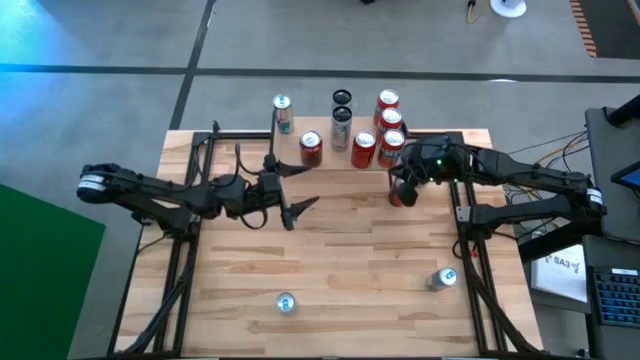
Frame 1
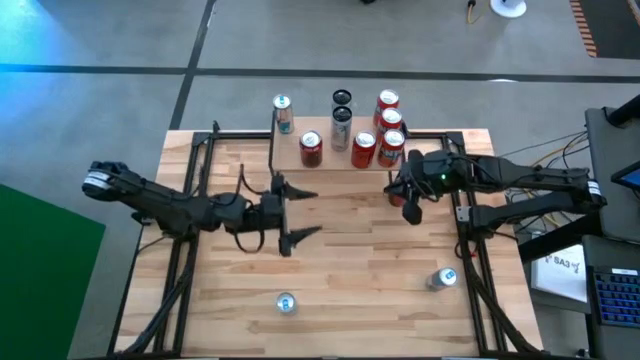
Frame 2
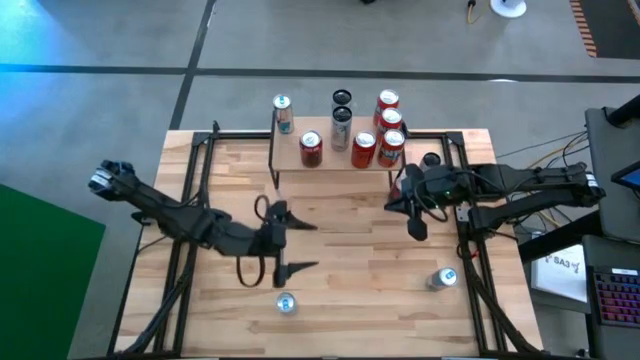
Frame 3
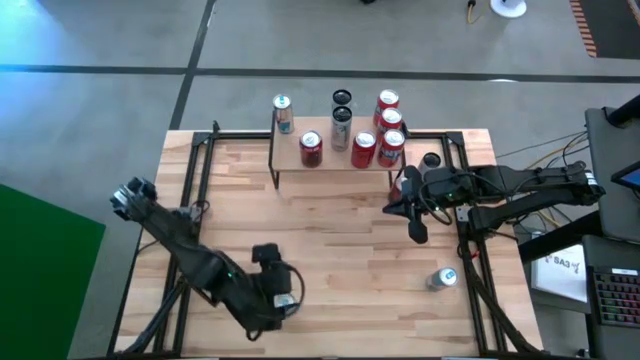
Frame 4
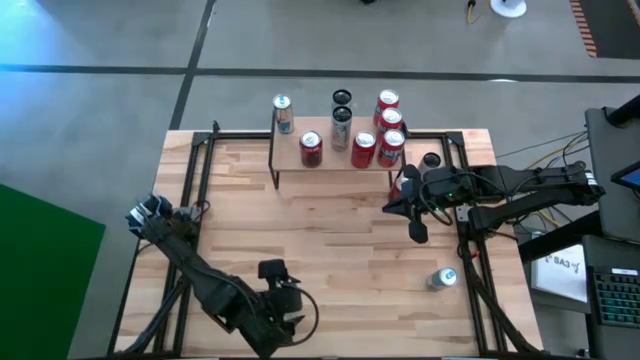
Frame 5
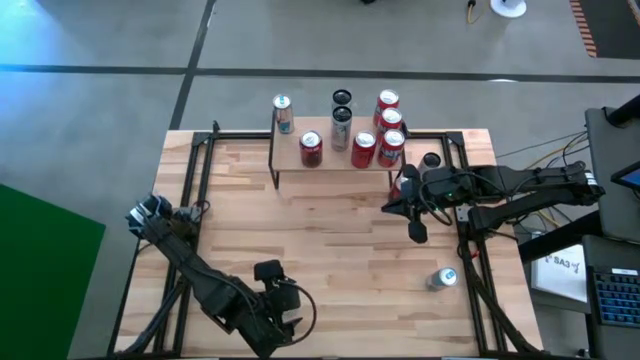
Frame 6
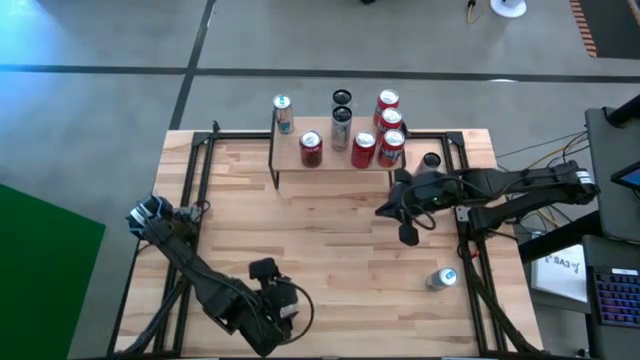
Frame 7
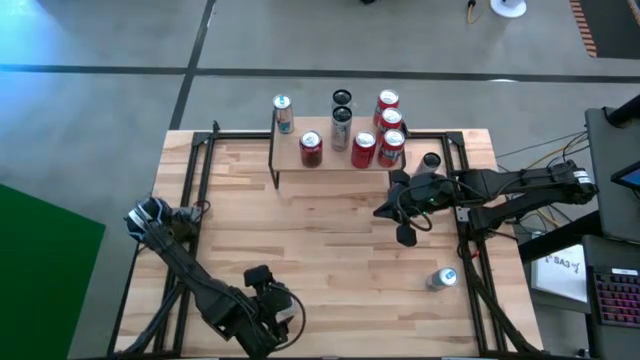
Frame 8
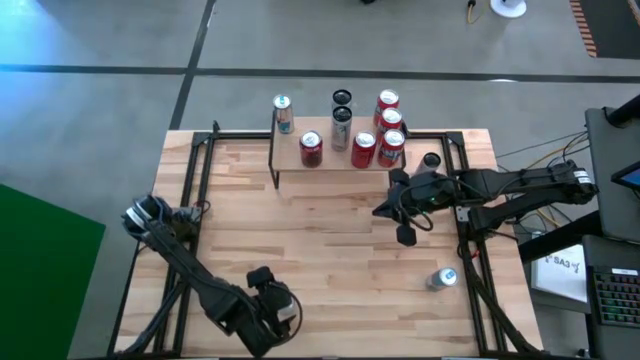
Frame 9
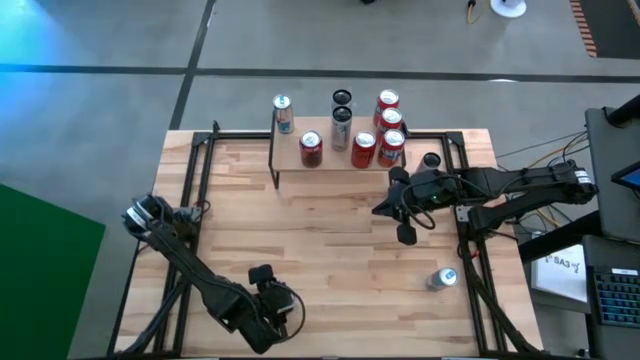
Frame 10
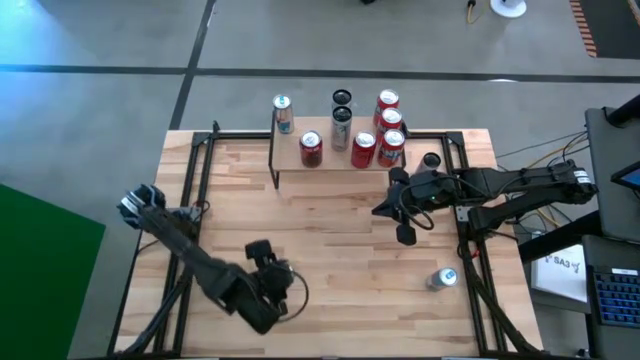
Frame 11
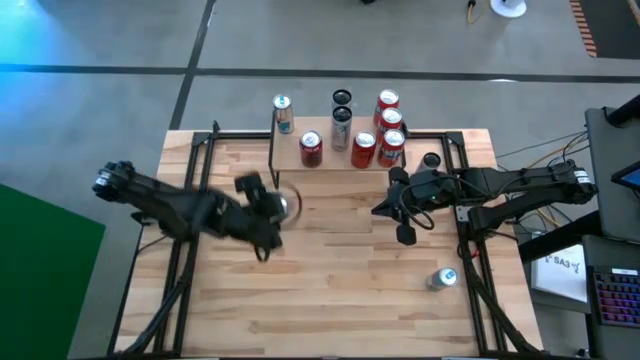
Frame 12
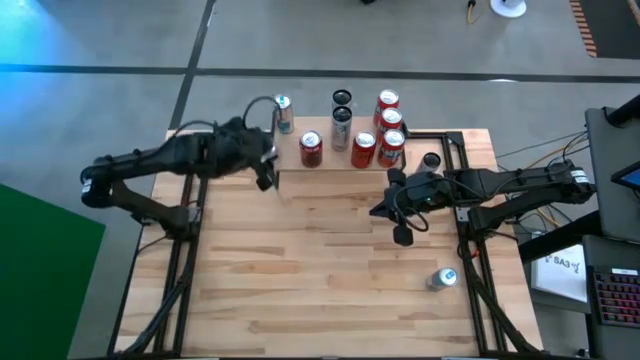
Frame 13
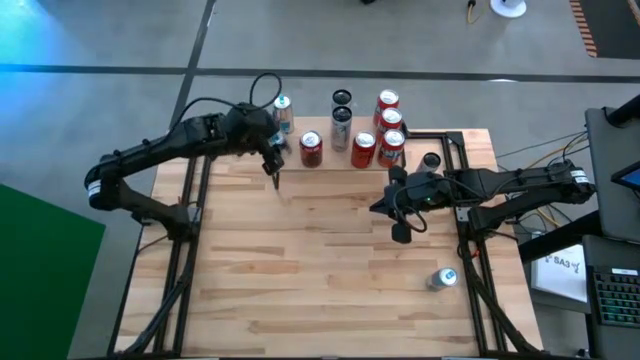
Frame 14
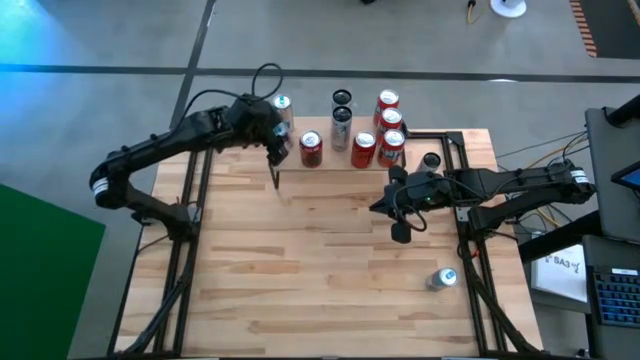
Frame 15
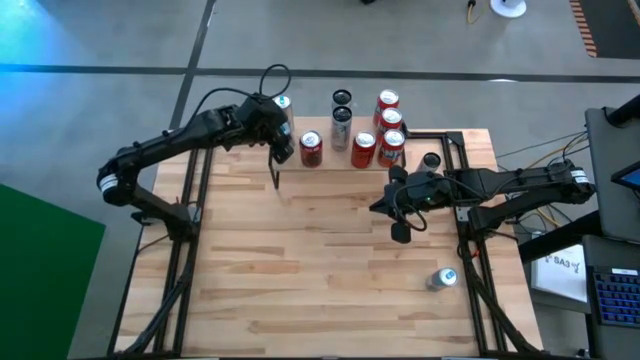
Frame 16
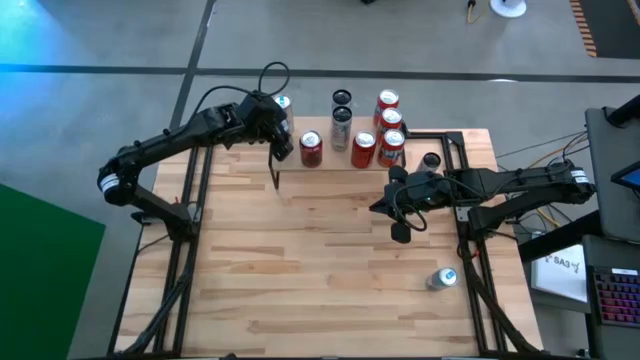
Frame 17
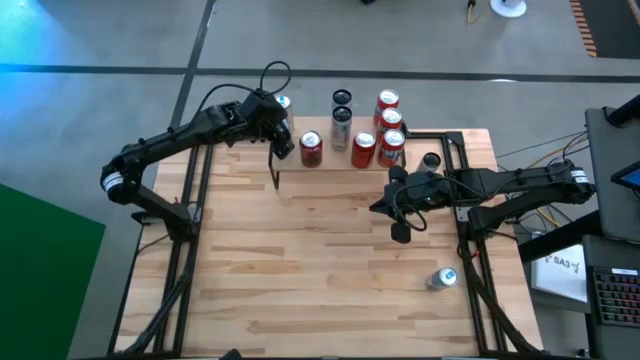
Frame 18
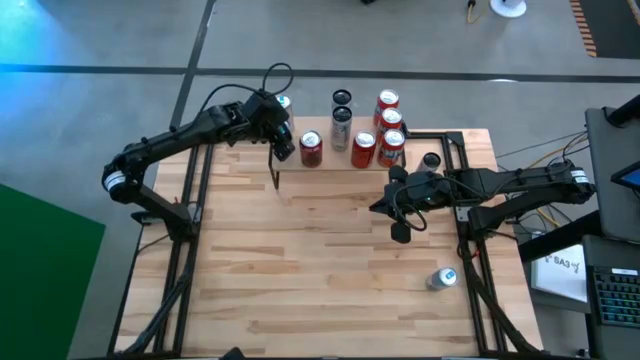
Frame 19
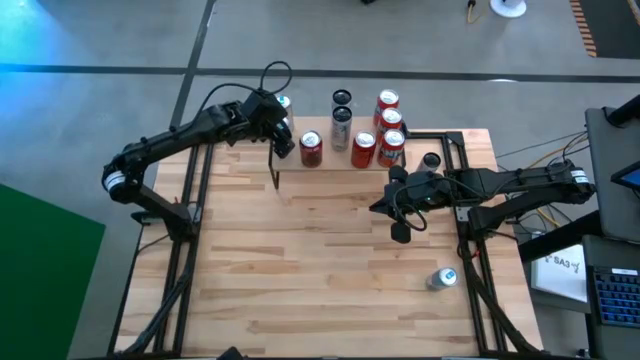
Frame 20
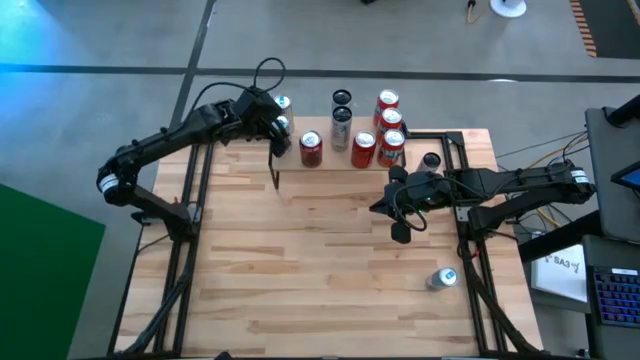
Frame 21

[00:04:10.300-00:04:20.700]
Task: Place canned beverage on shelf
Put the bottom blue soda can on the shelf

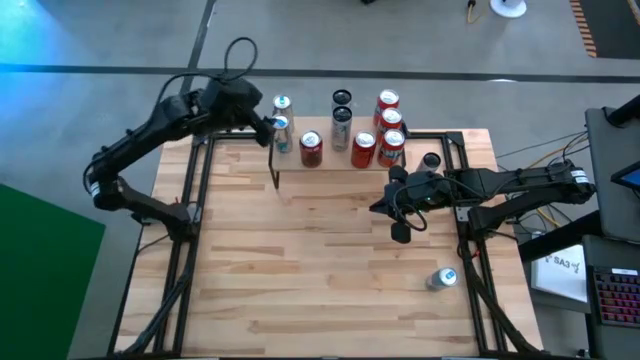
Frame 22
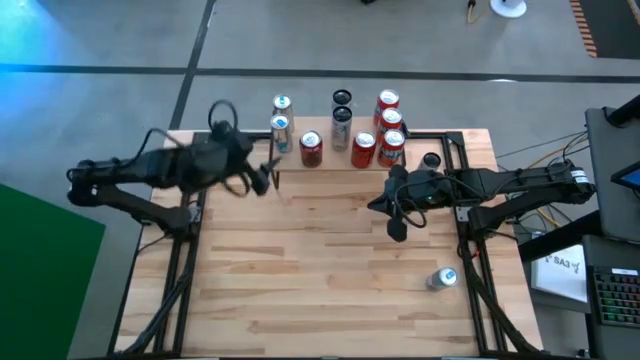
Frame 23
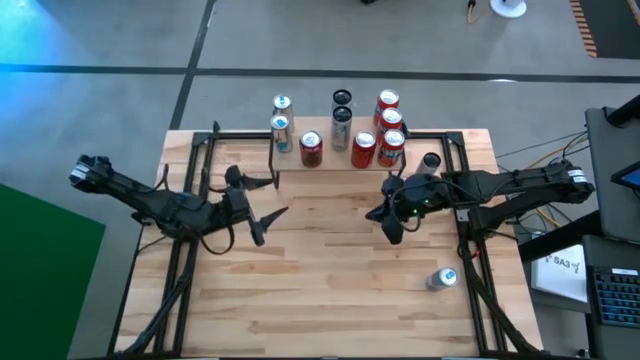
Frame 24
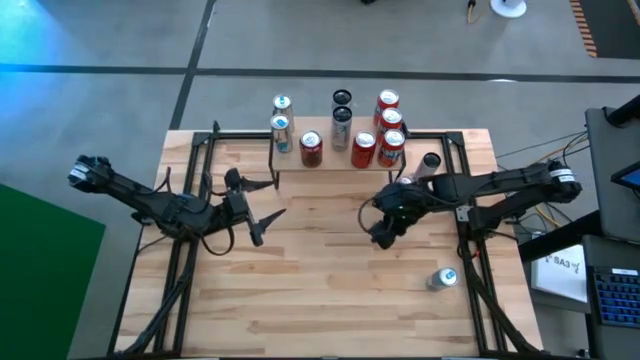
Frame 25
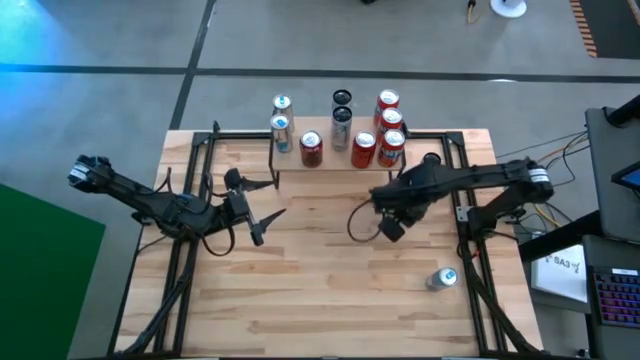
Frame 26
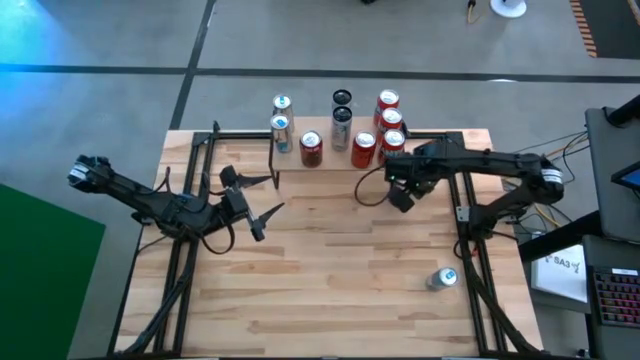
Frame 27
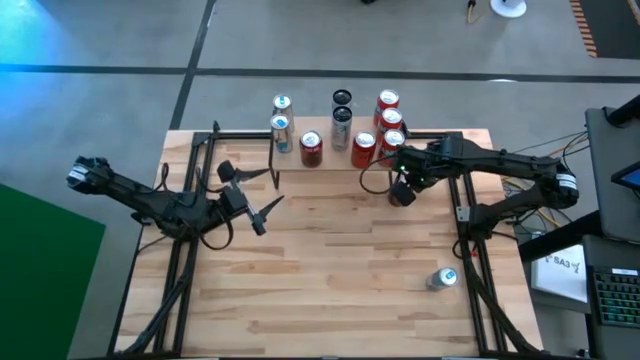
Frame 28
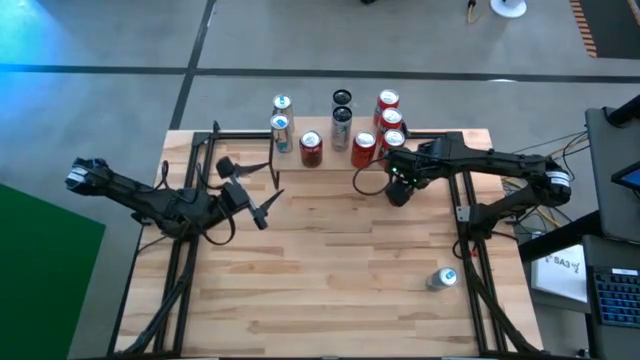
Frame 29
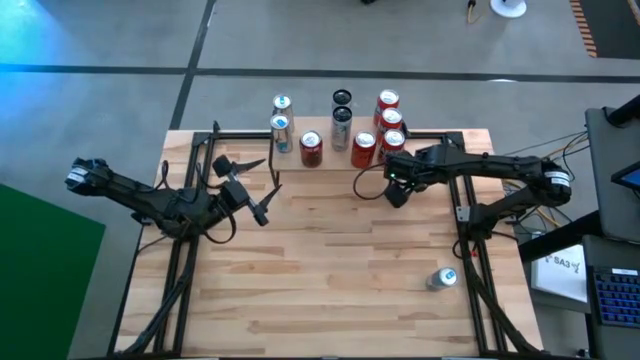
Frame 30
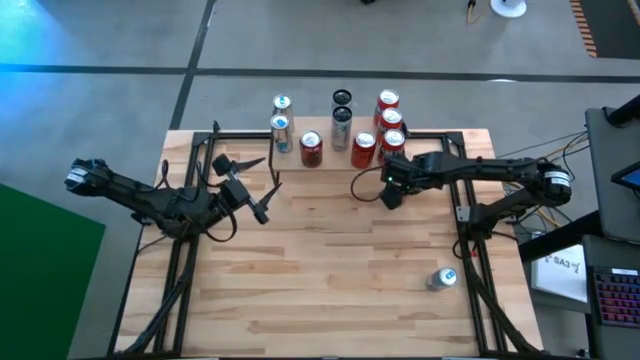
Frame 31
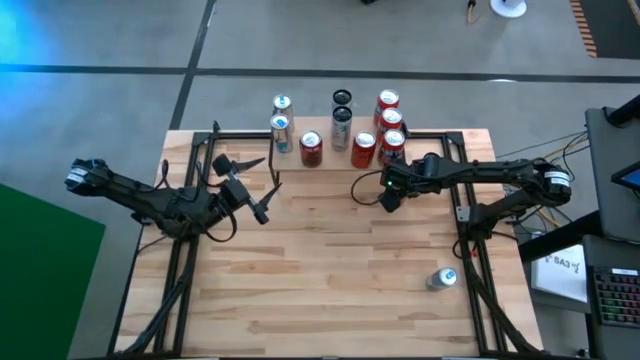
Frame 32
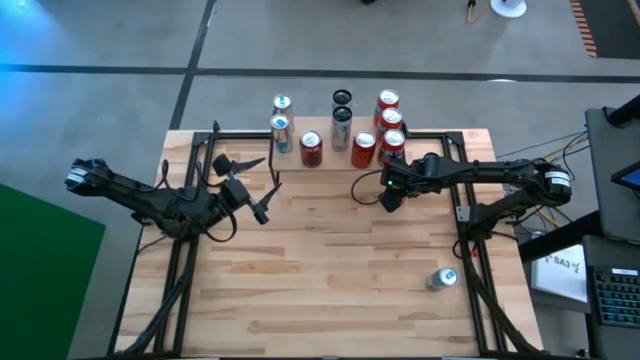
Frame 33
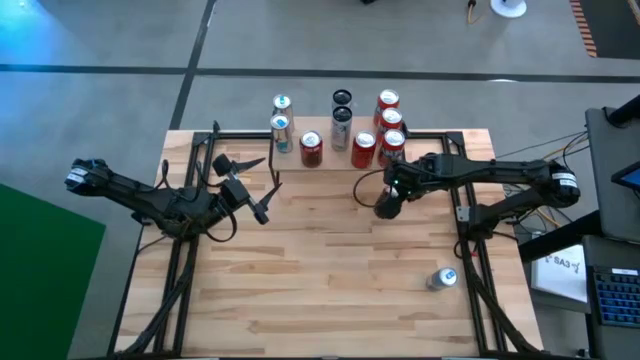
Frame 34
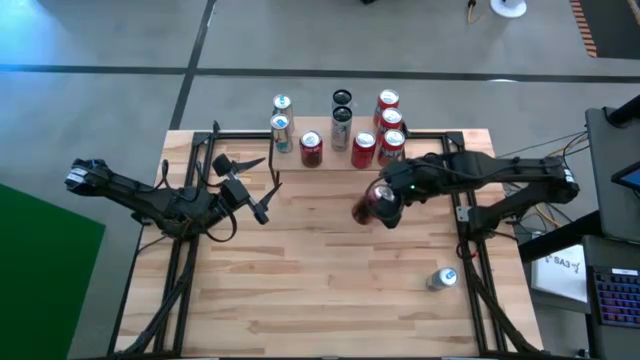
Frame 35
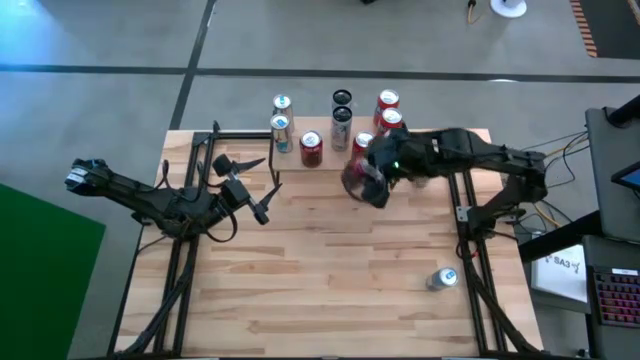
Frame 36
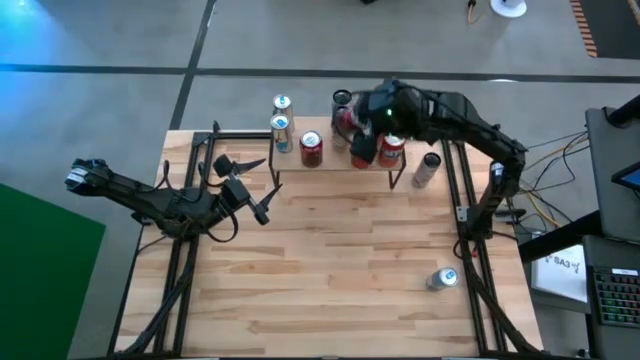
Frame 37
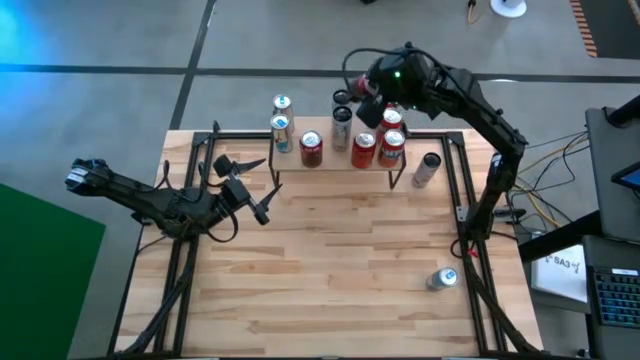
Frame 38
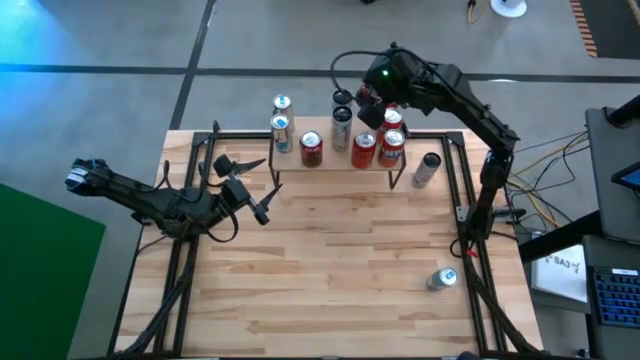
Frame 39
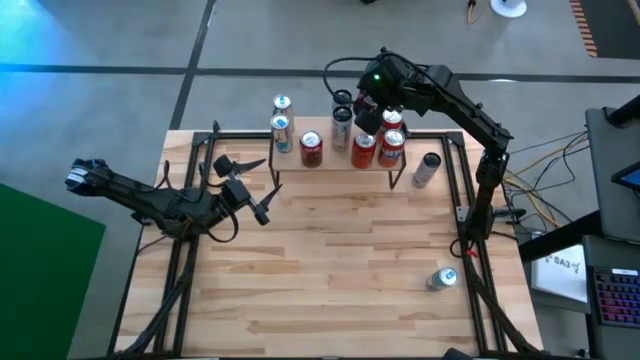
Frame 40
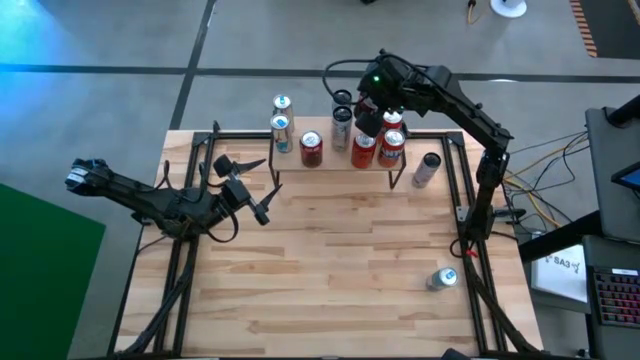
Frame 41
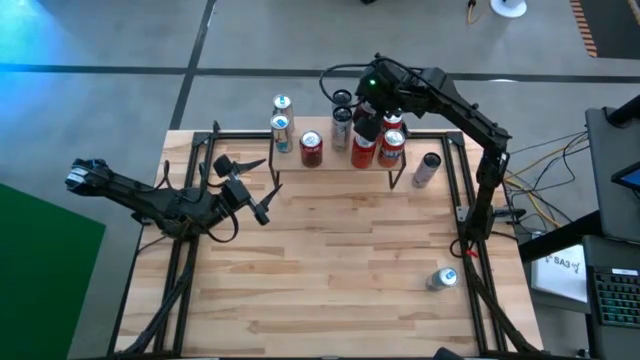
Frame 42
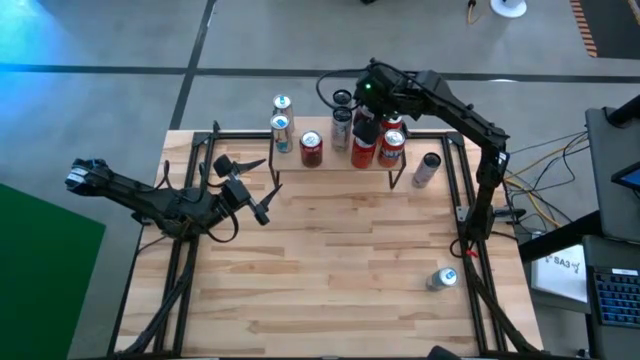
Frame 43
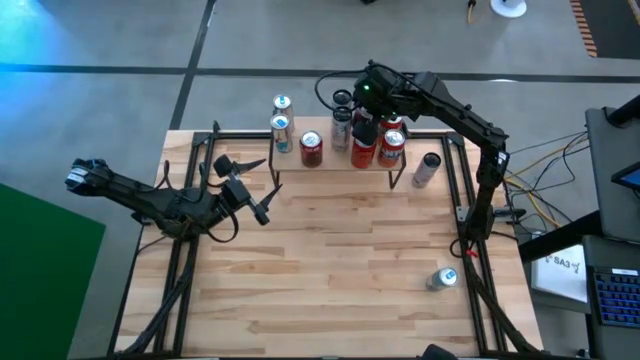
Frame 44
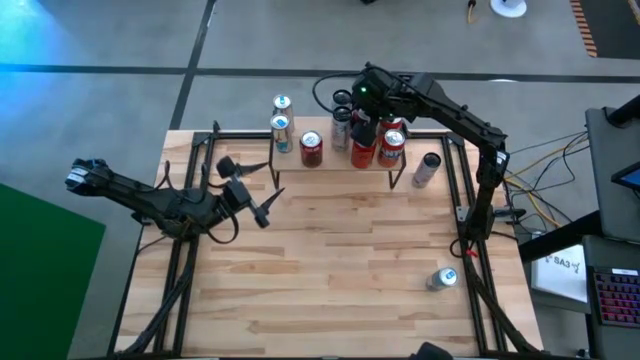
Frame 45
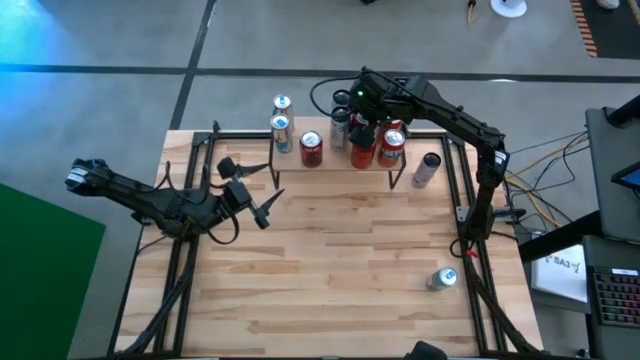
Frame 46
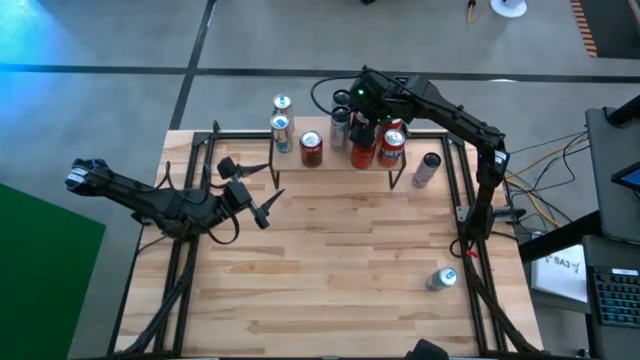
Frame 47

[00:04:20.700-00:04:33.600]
Put the red soda can on the shelf
